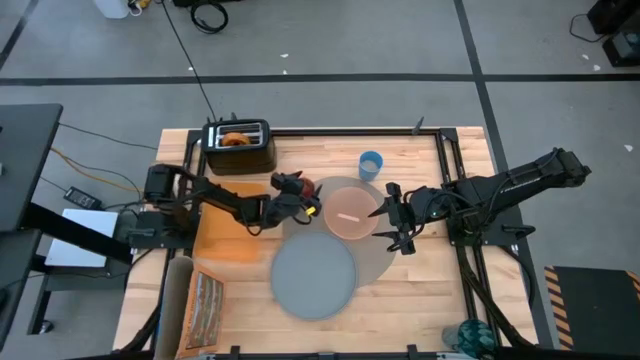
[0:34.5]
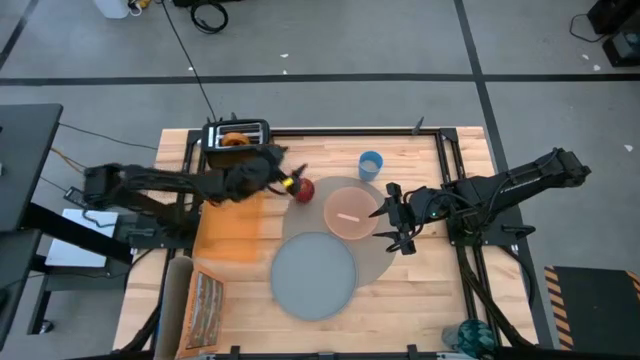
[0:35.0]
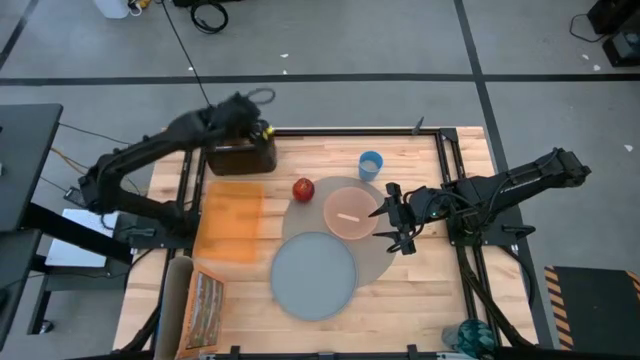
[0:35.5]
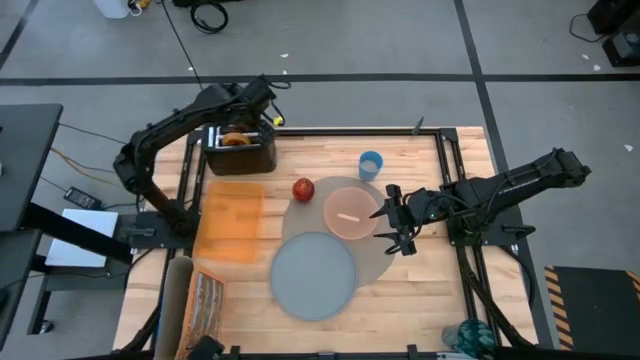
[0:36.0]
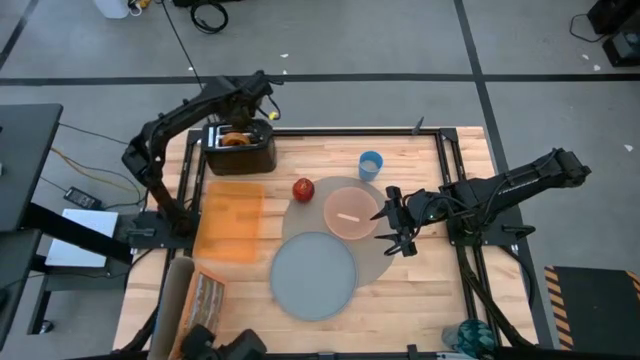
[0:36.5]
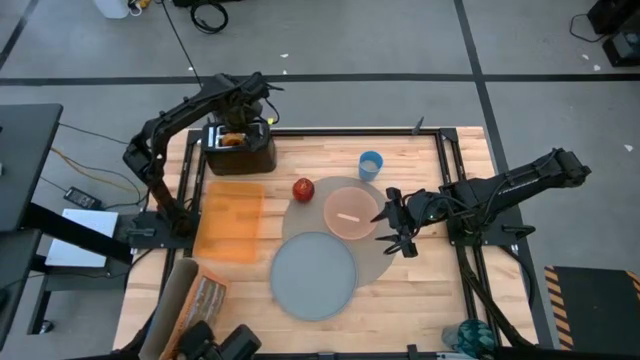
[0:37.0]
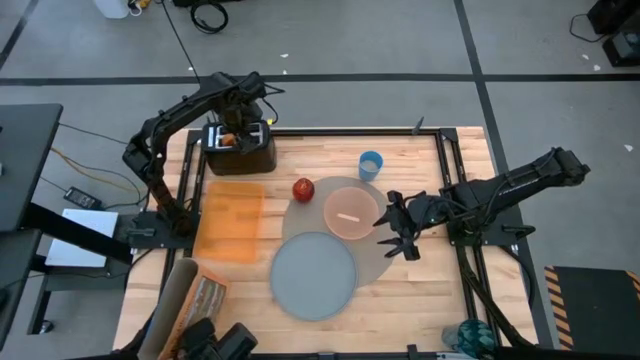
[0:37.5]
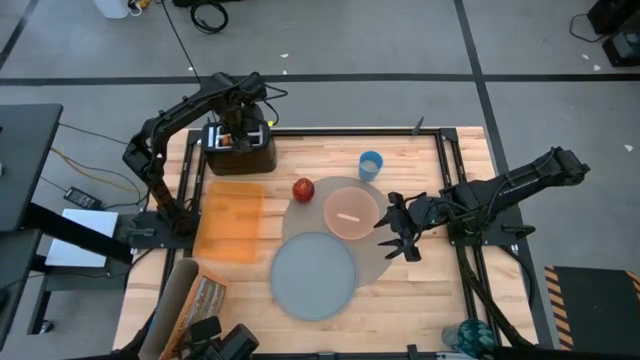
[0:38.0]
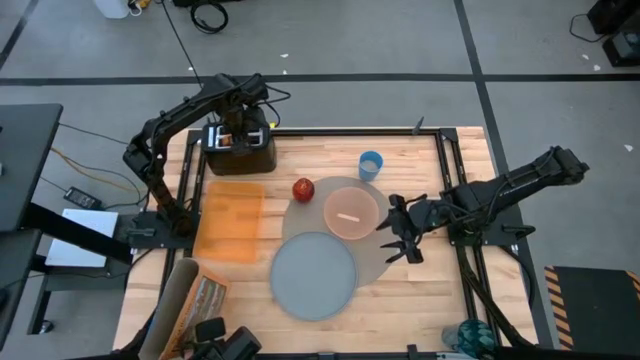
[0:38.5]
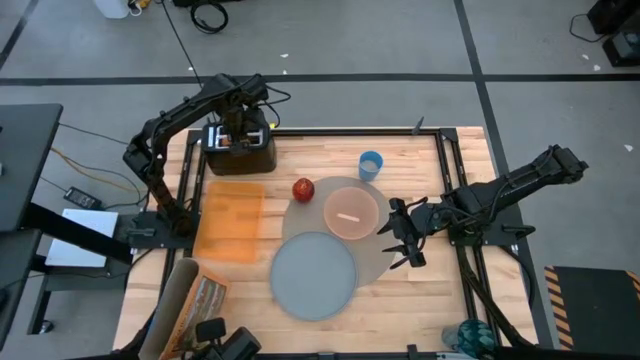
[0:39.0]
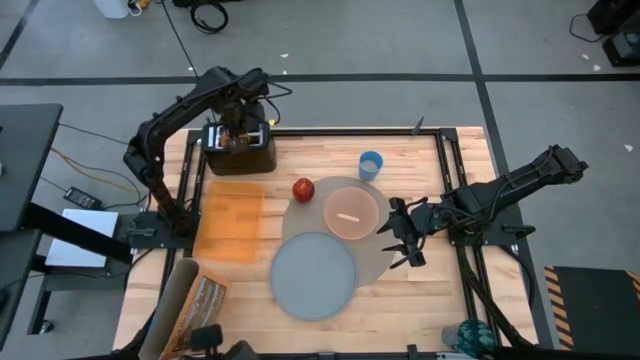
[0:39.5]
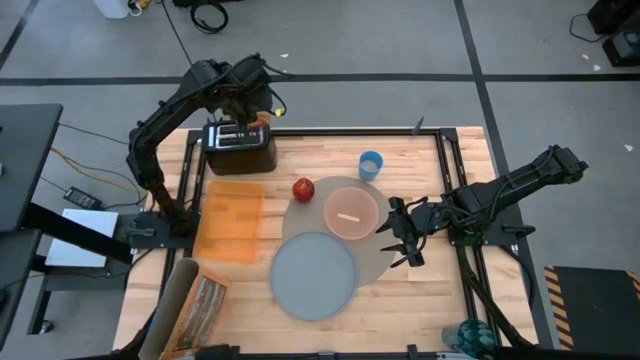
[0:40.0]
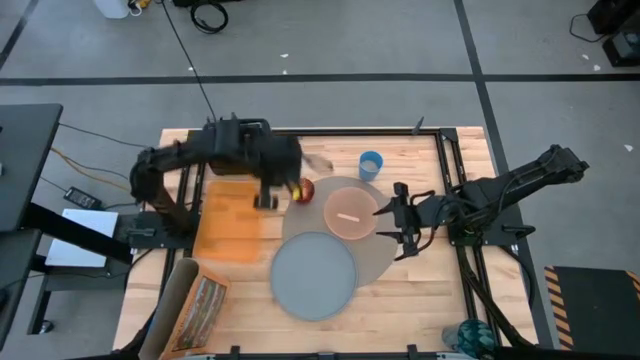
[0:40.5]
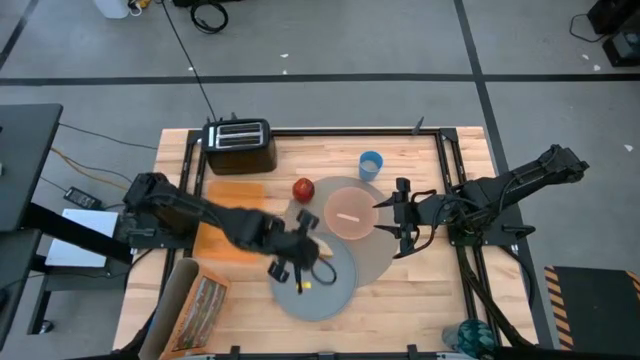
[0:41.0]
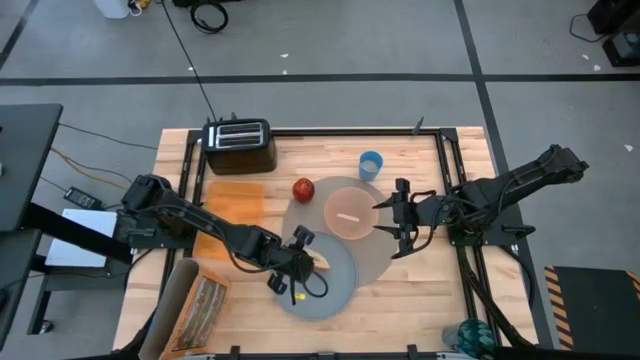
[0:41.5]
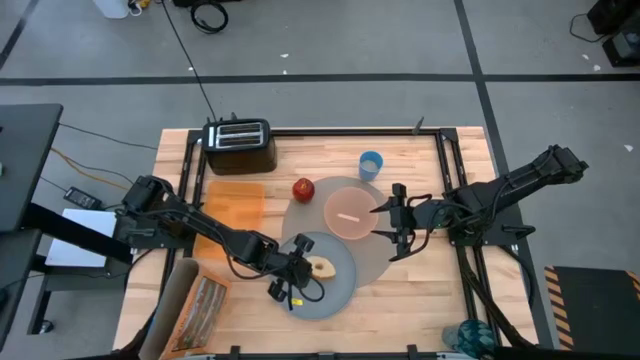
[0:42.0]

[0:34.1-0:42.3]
Task: Arrange a breakfast setting
Put the toasted bread from the toaster on the blue plate

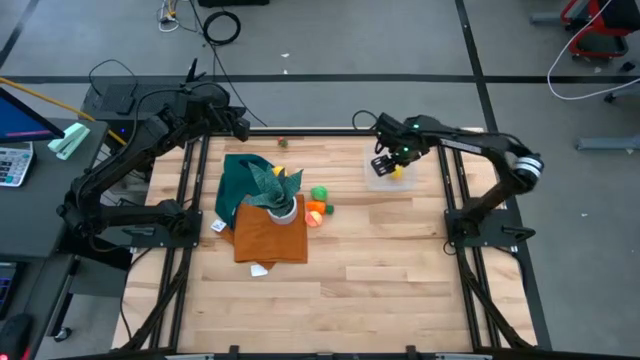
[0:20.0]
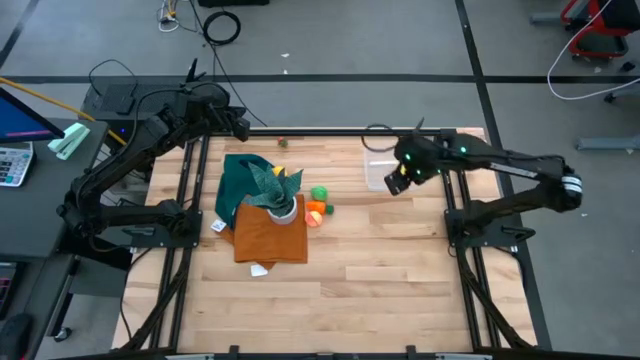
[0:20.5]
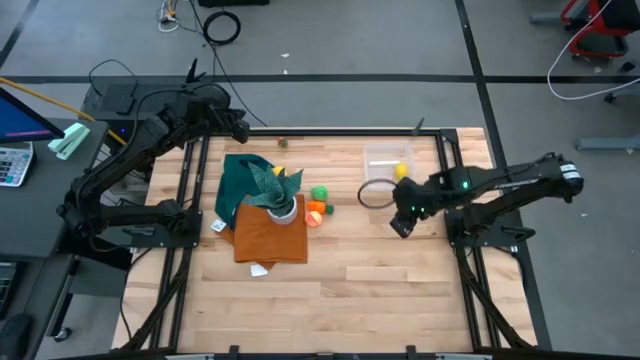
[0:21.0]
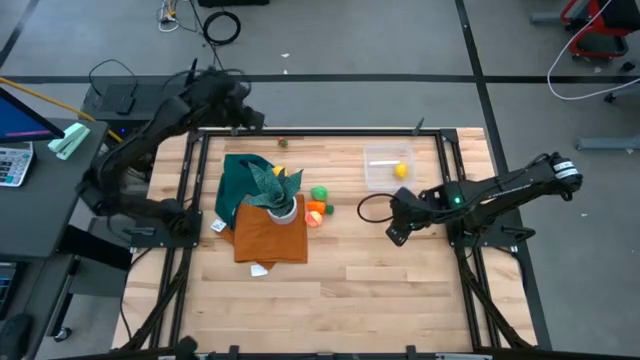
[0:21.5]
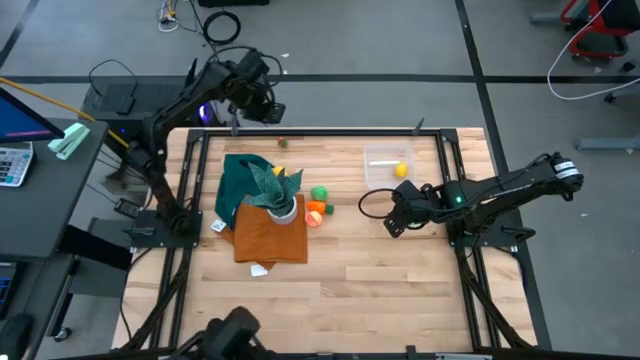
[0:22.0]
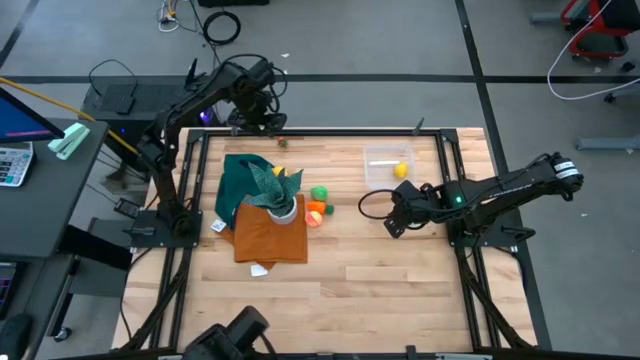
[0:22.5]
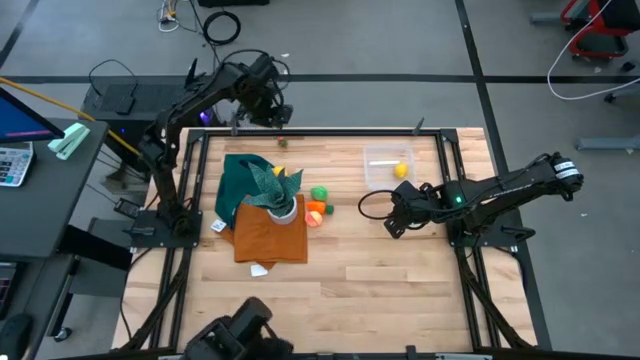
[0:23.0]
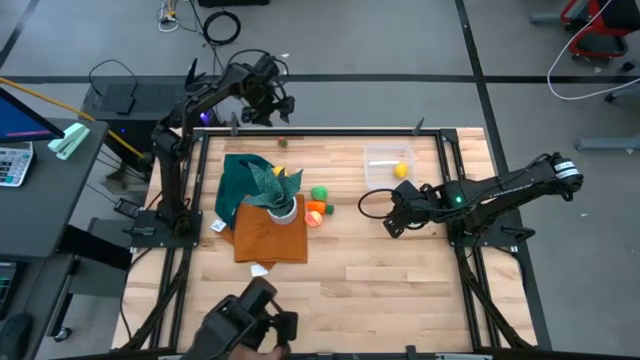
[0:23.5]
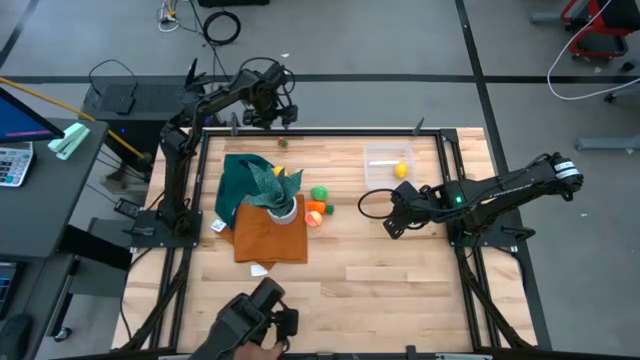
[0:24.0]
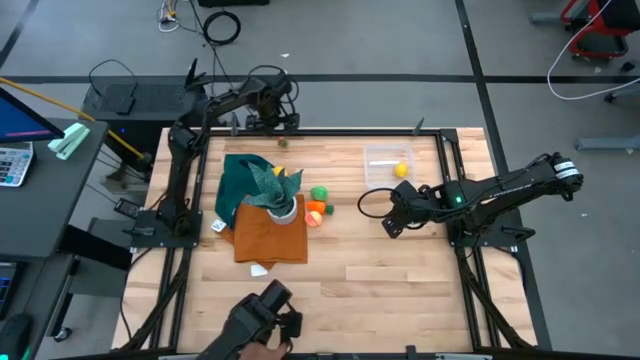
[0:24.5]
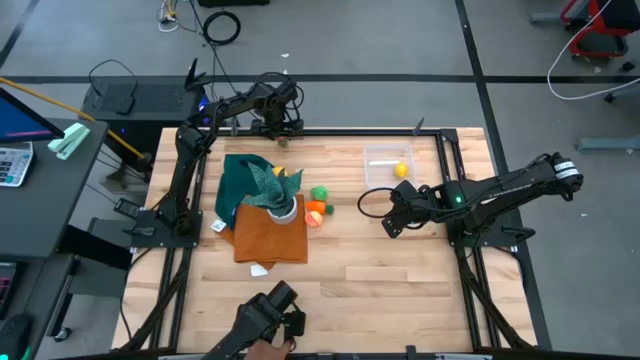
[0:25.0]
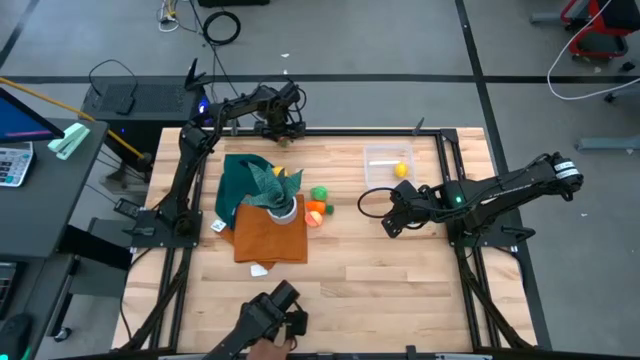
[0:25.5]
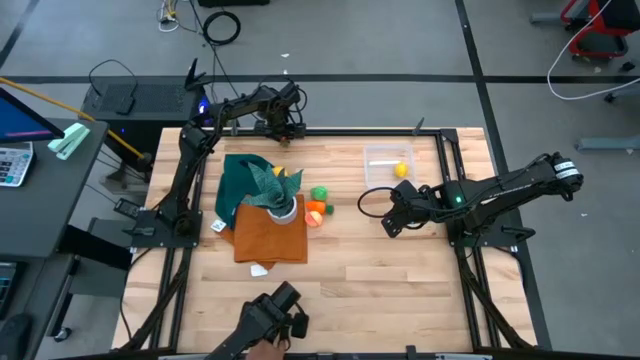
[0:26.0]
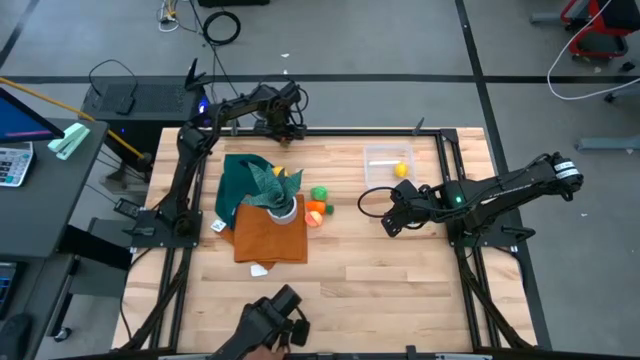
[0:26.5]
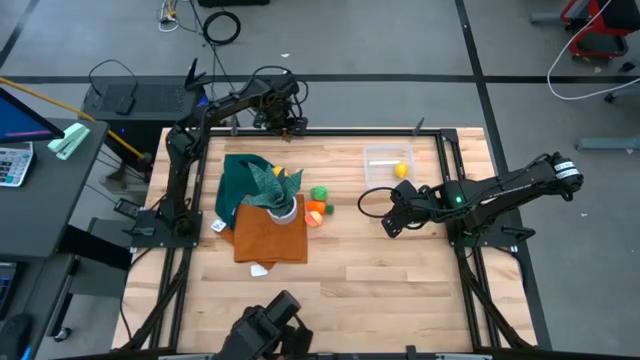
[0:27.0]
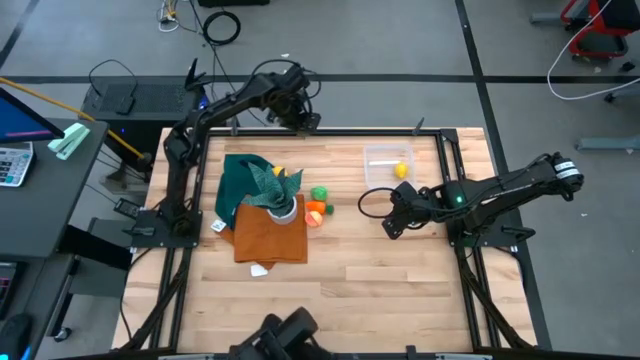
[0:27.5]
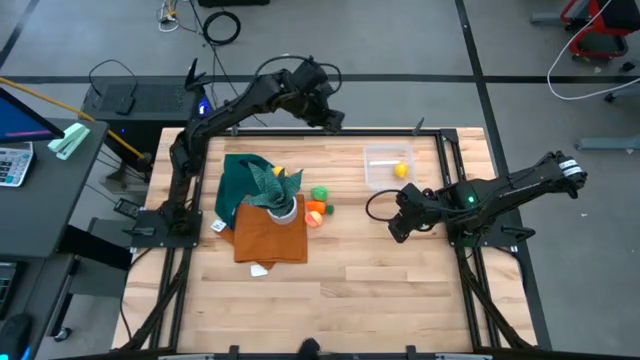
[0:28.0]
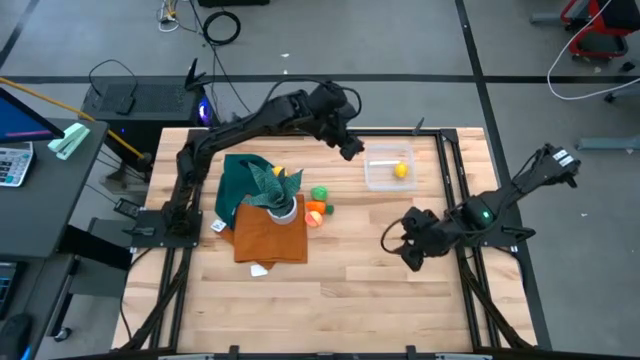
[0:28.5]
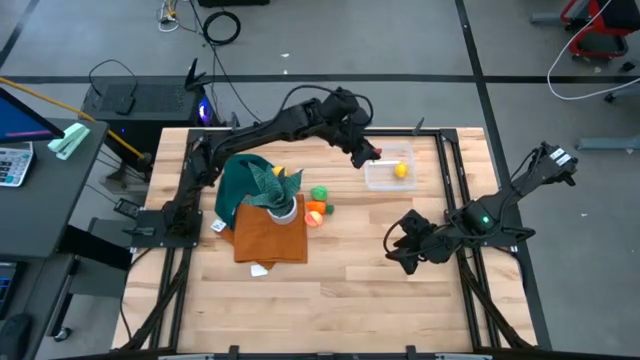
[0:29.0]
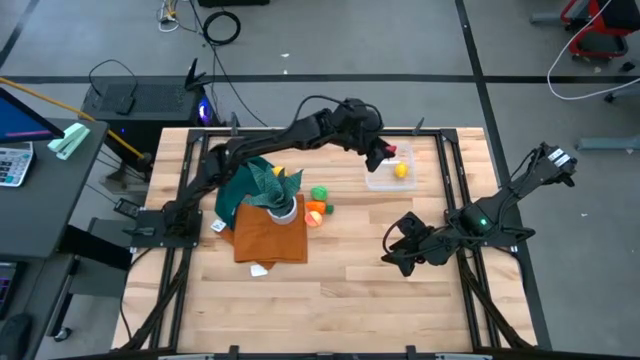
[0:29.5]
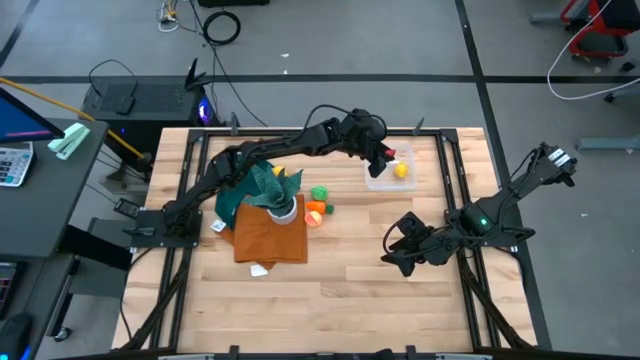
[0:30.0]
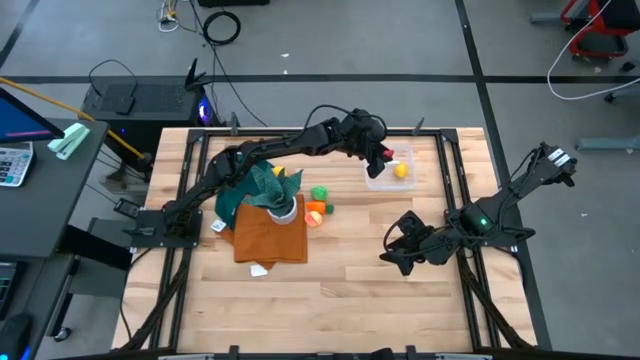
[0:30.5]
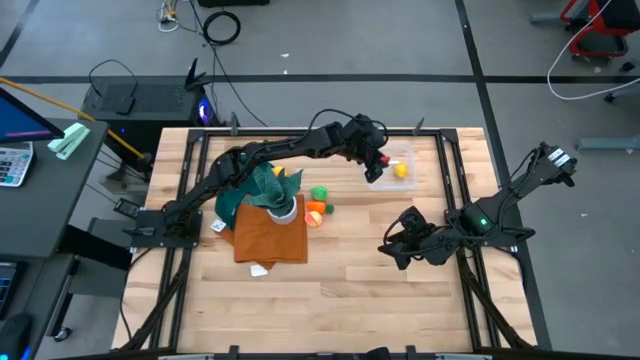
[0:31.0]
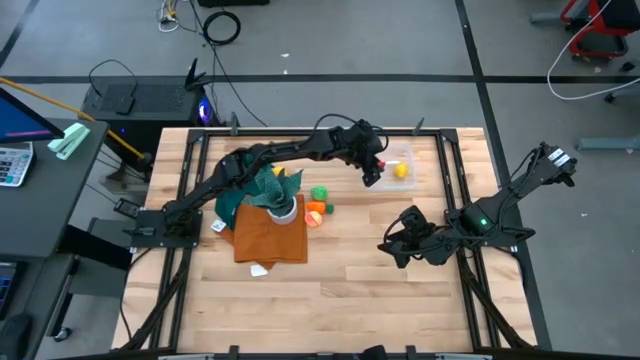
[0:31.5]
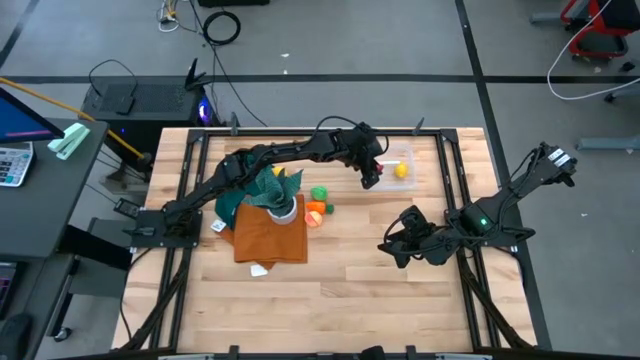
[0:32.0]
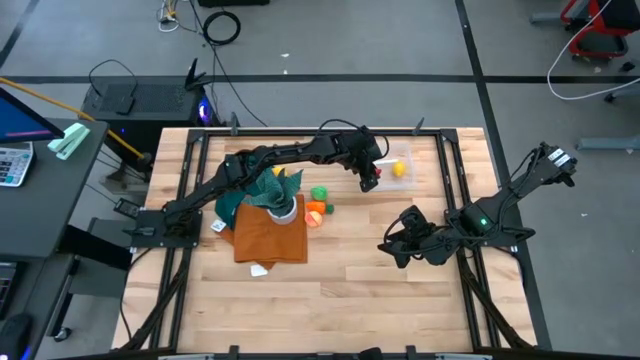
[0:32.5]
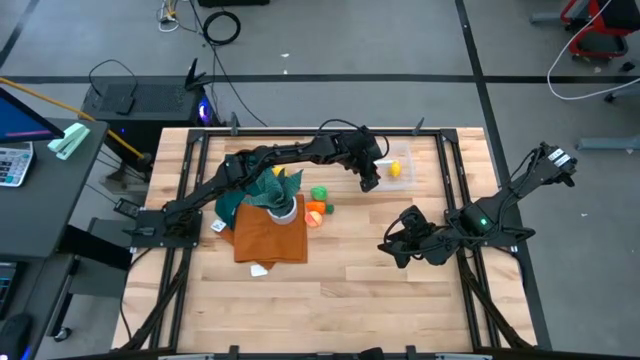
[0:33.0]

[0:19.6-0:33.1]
Task: Pick and placing Produce into tupperware
Put the strawberry into the transparent bin
